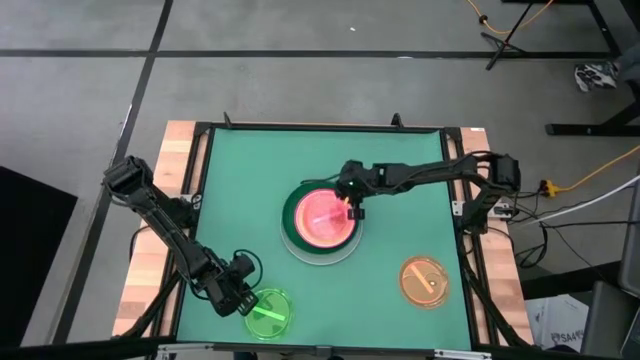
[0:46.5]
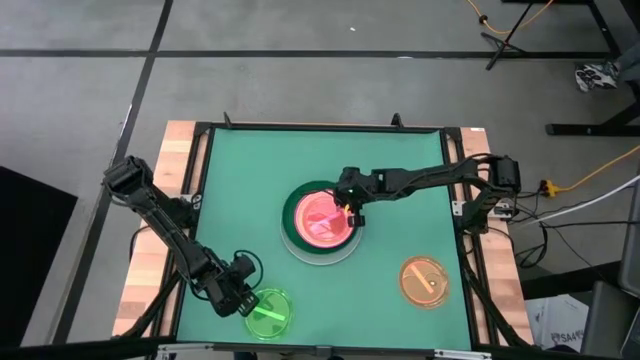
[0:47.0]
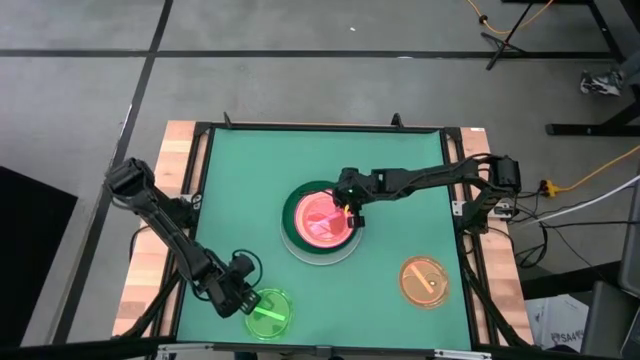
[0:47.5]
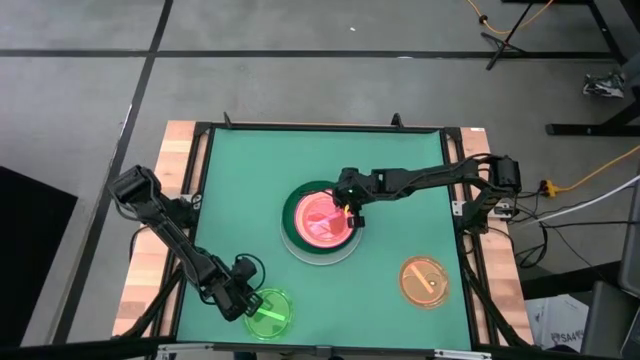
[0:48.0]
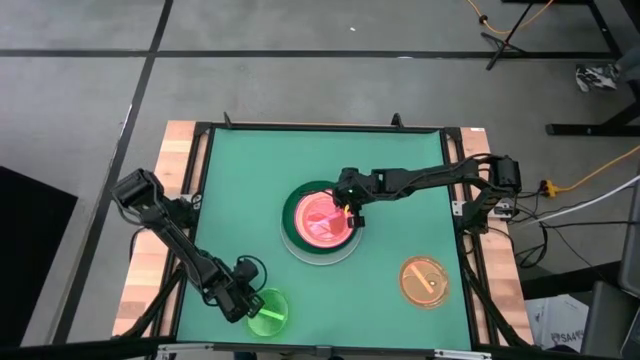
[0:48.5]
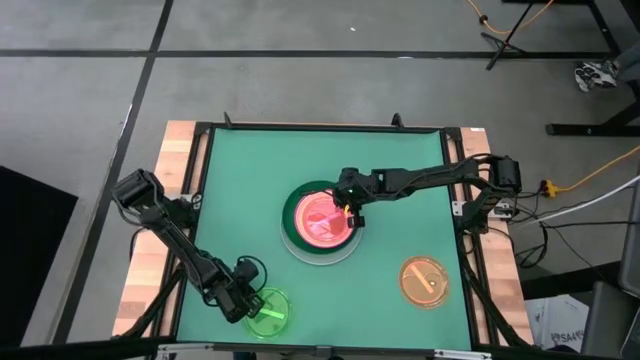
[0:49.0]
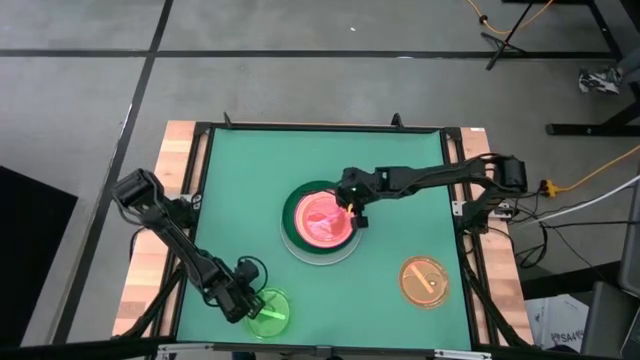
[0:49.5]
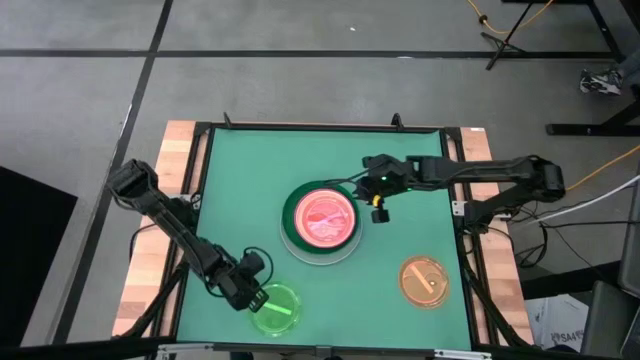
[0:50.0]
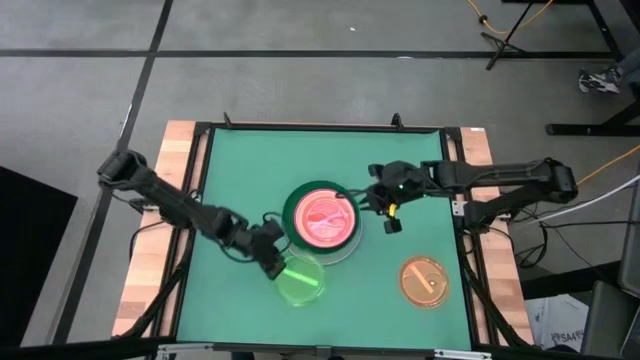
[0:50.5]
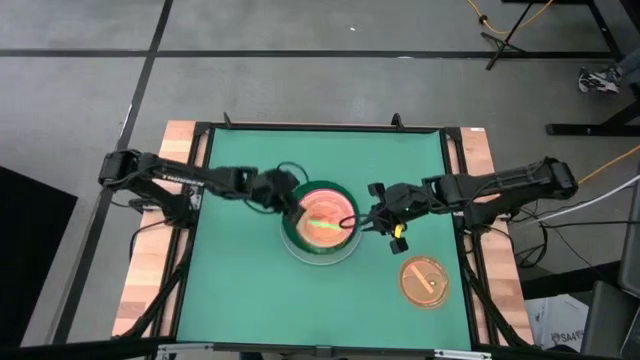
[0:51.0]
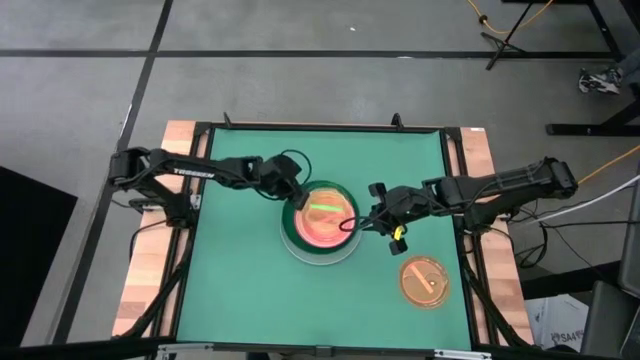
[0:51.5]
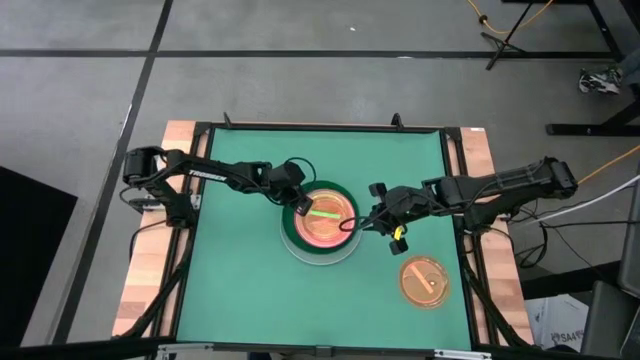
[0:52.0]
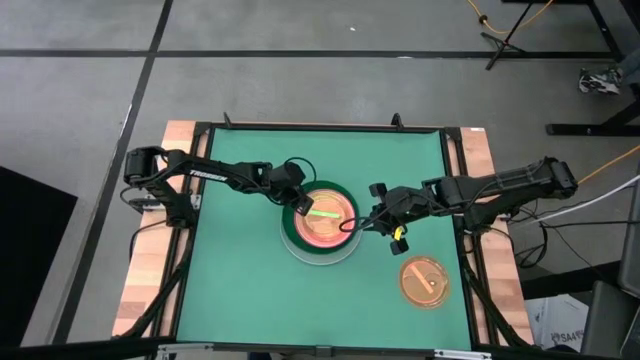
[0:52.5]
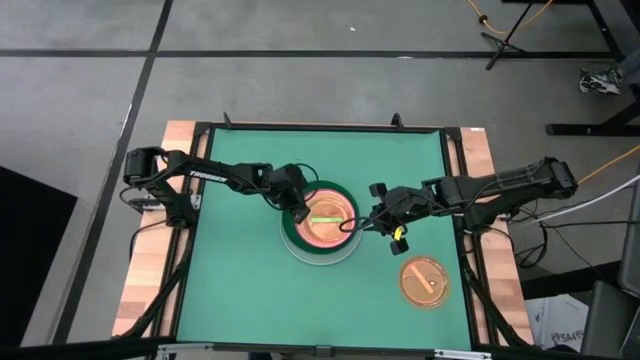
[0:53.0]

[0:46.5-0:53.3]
Task: Stack plastic plates
Stack the light green plate on top of the light pink plate

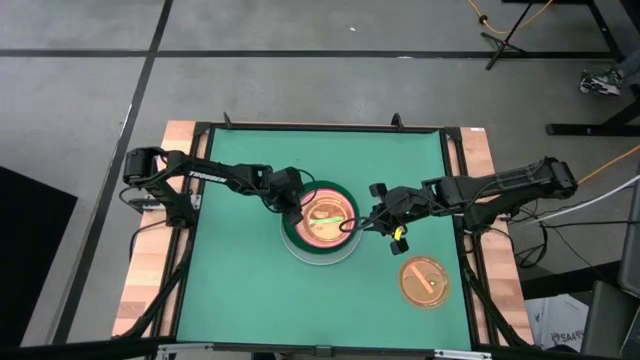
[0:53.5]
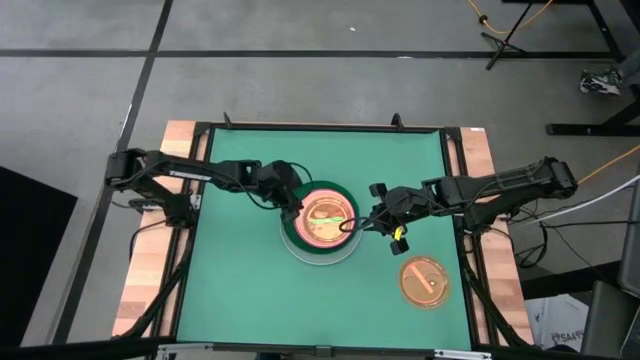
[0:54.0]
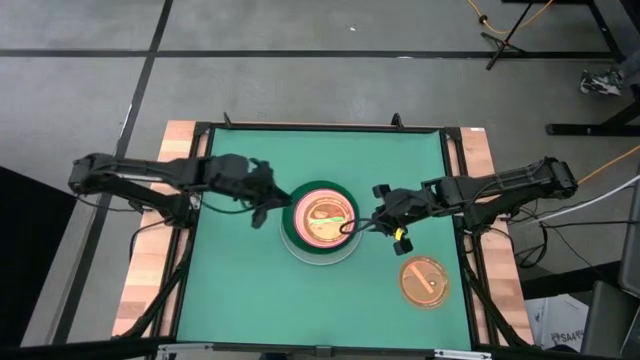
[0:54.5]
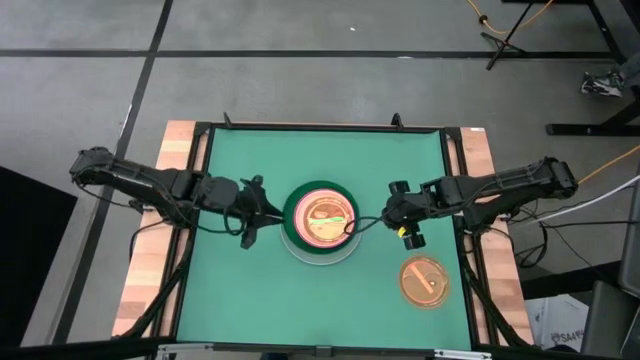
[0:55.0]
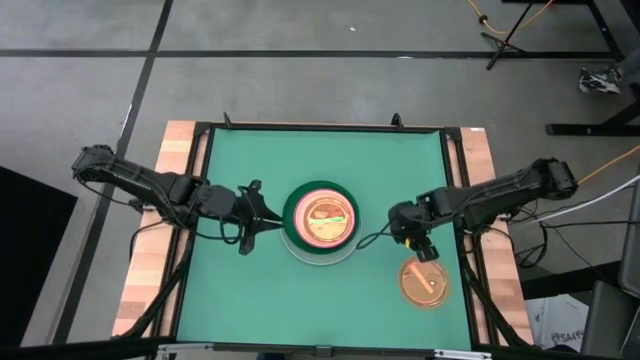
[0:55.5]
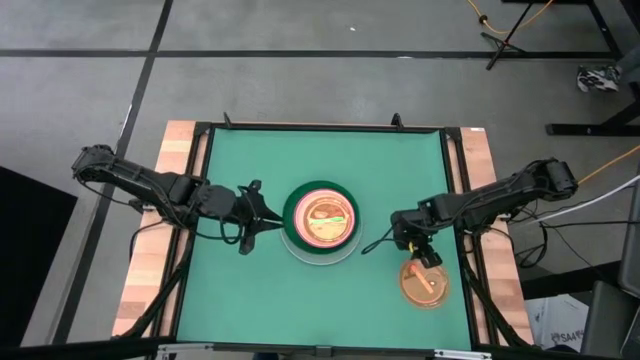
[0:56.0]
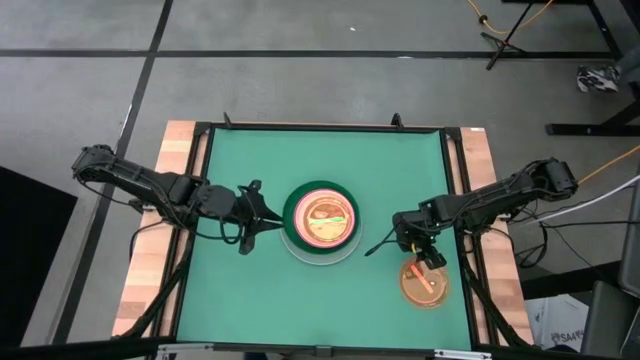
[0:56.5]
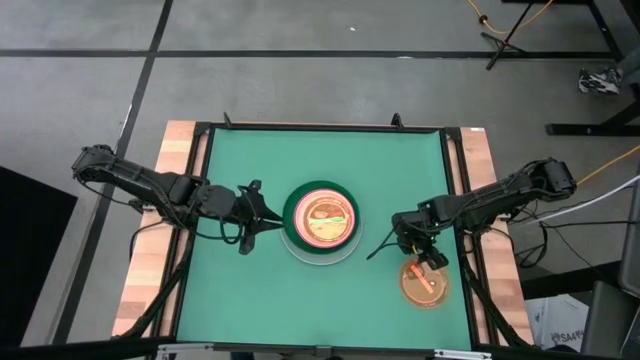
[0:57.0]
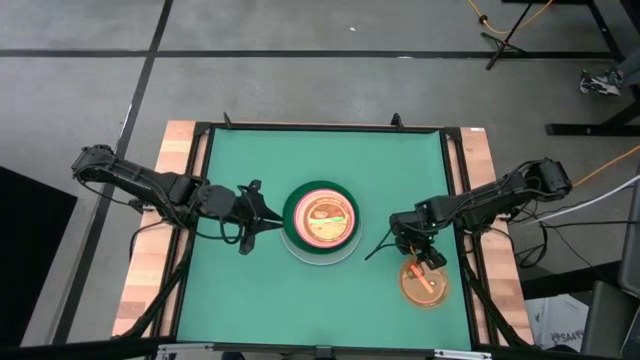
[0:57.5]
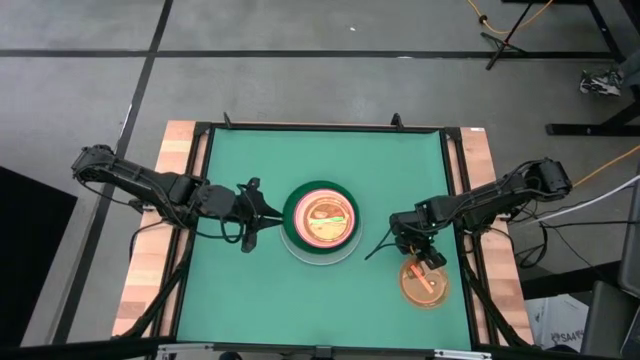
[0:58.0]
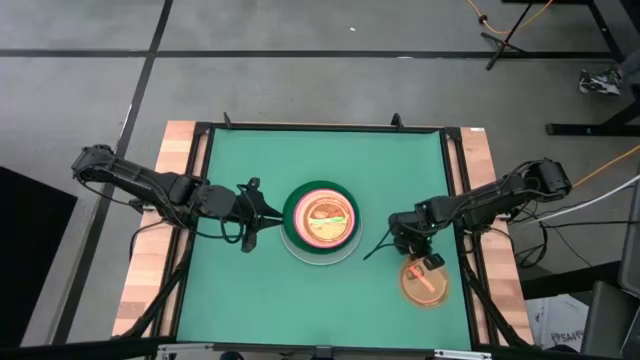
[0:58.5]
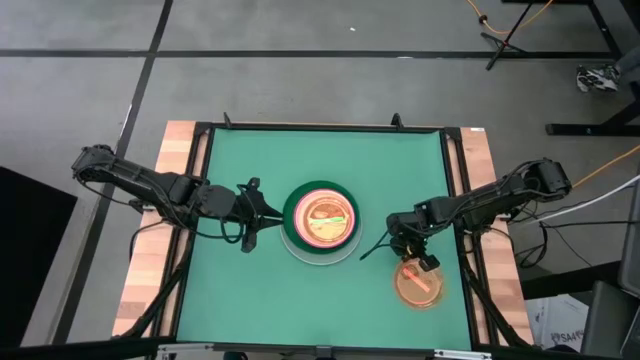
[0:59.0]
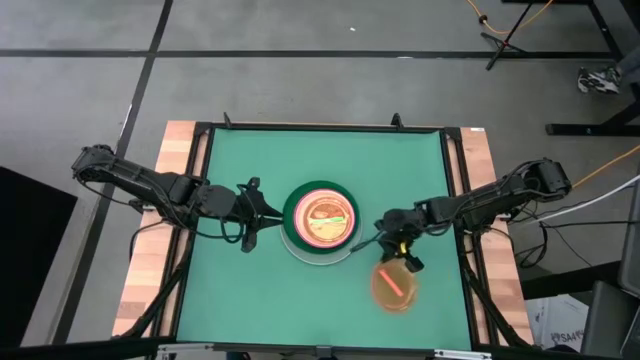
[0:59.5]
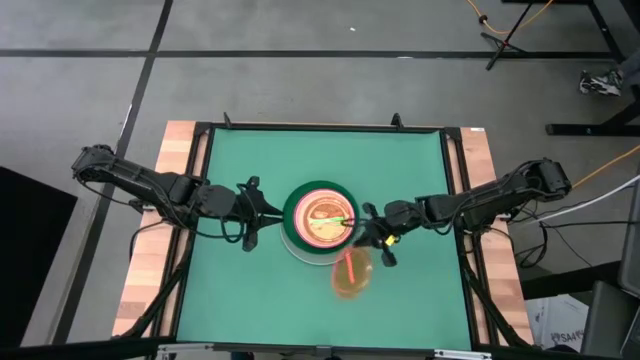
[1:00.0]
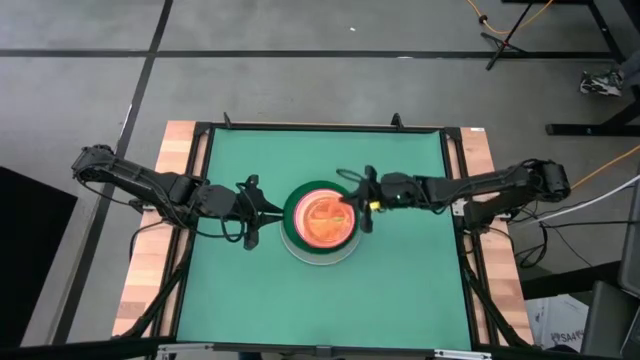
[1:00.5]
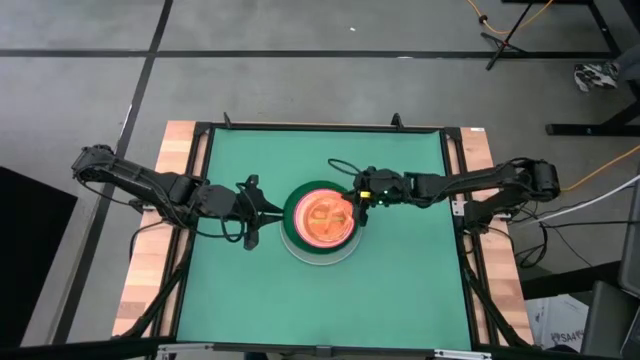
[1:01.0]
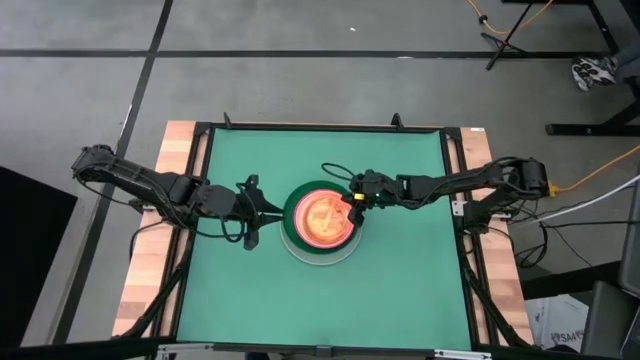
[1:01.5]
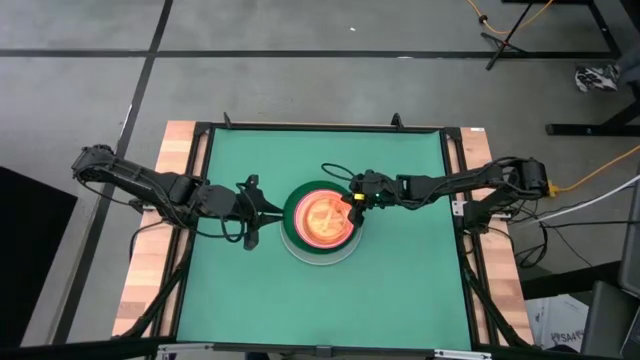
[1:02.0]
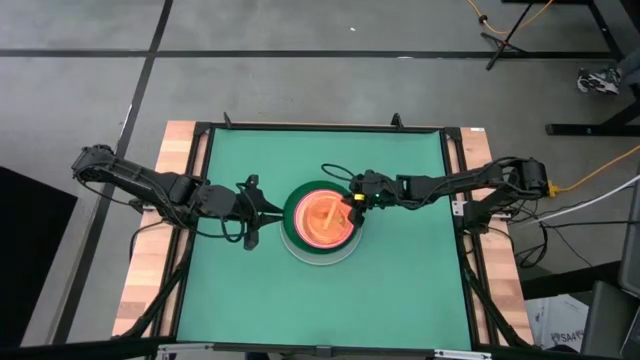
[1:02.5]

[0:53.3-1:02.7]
Stack the orange plate on top of the light green plate

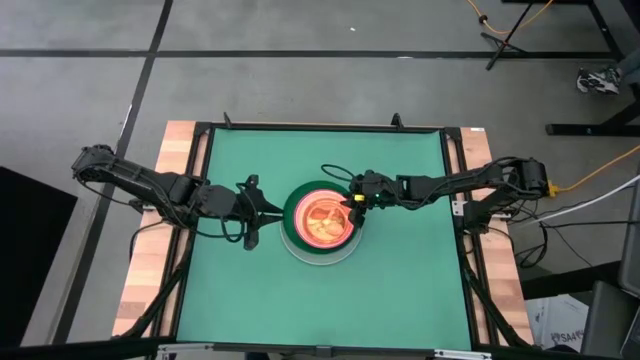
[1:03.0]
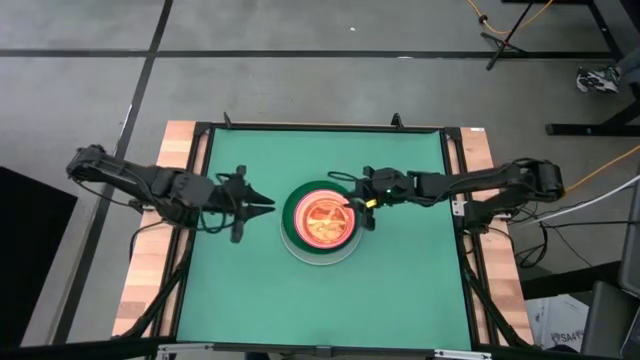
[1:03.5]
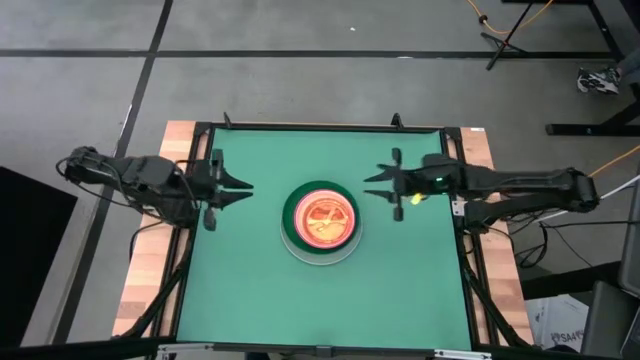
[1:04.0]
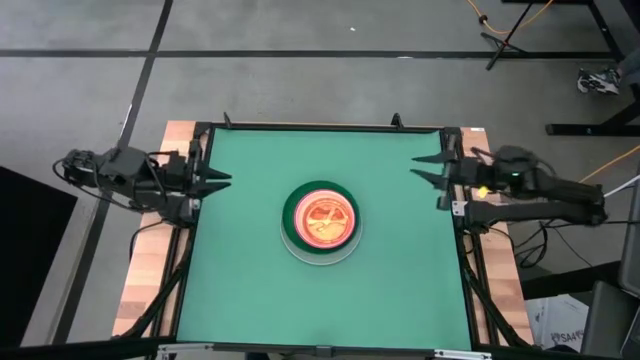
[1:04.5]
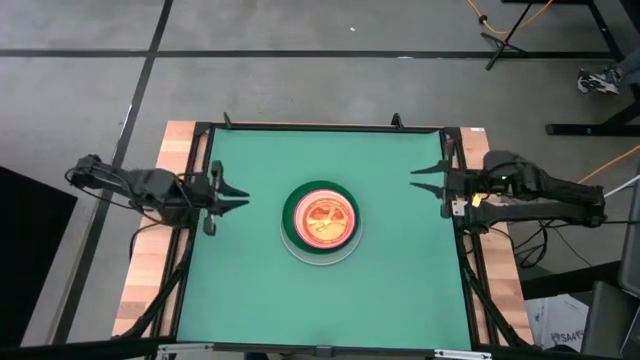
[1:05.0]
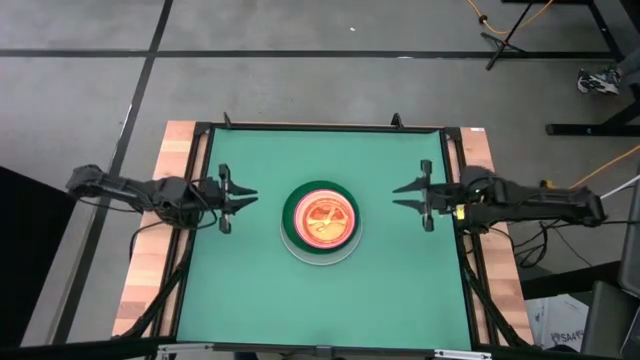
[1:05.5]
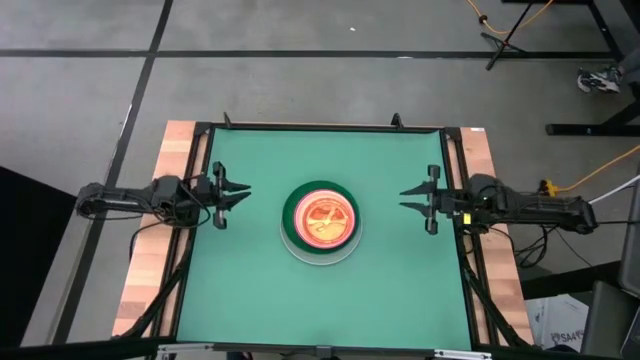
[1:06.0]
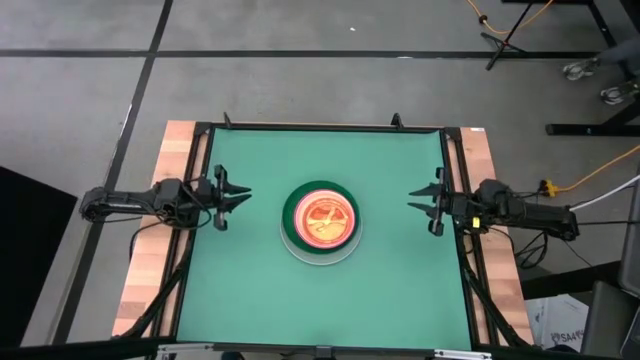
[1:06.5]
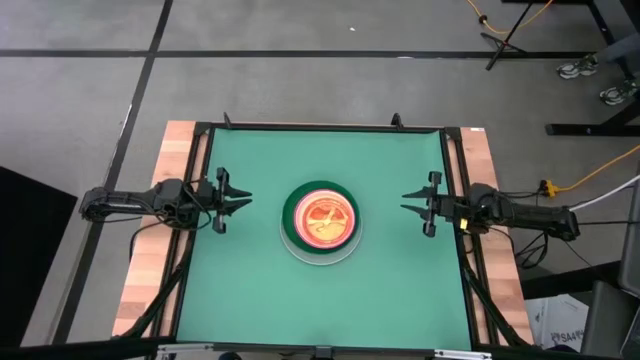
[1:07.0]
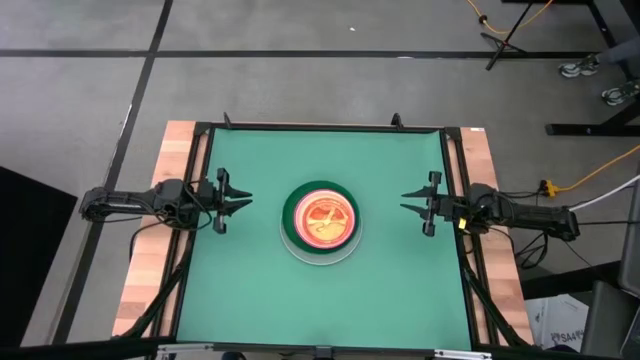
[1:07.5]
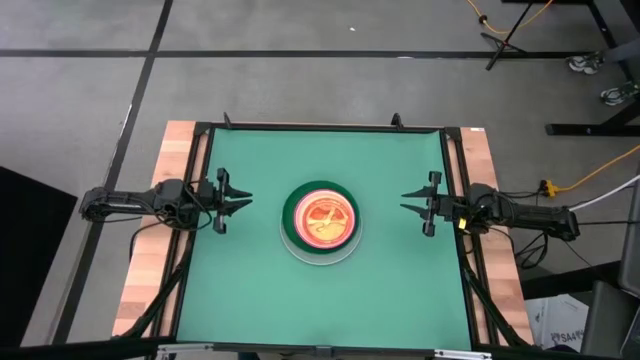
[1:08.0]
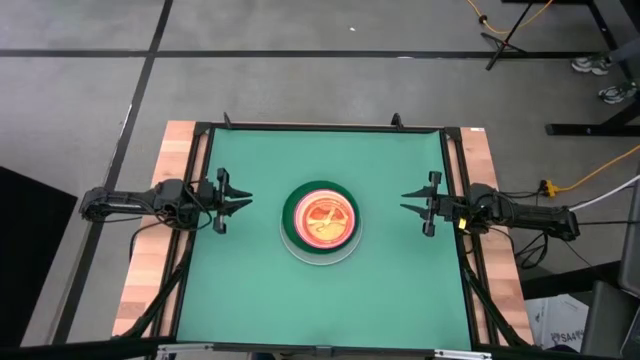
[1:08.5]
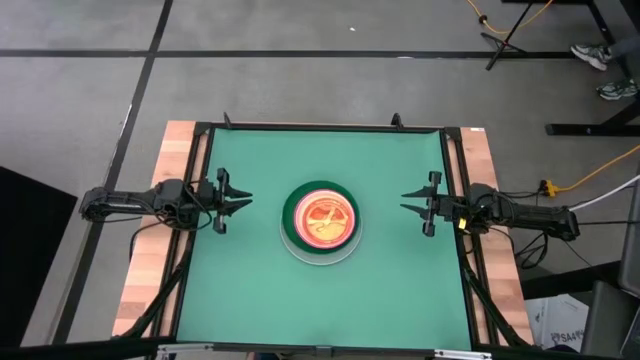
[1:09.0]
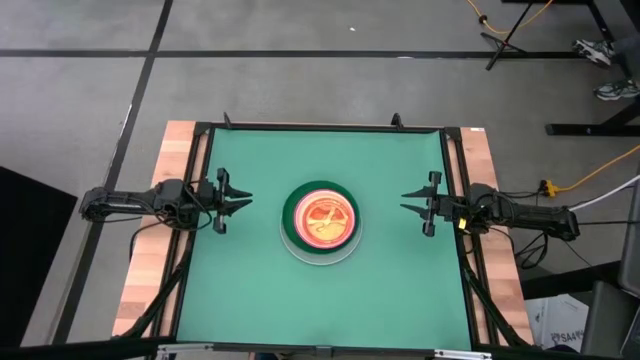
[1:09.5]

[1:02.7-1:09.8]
Return to Home Position
